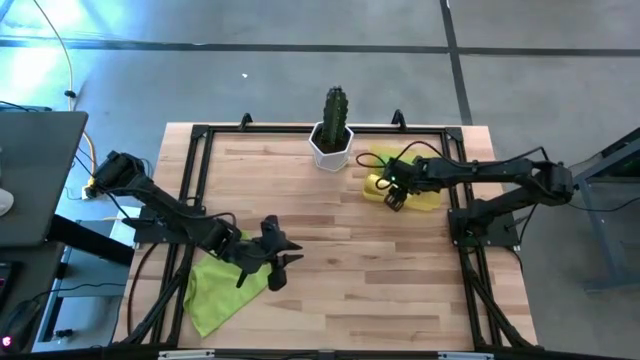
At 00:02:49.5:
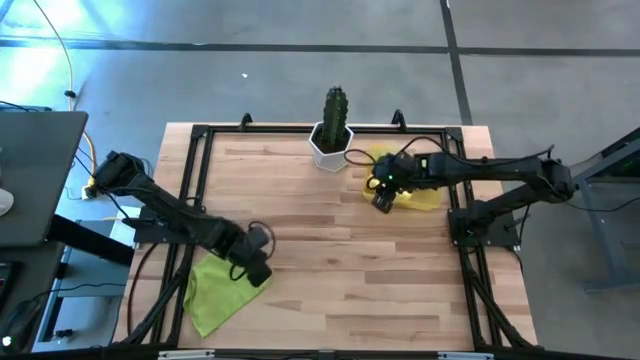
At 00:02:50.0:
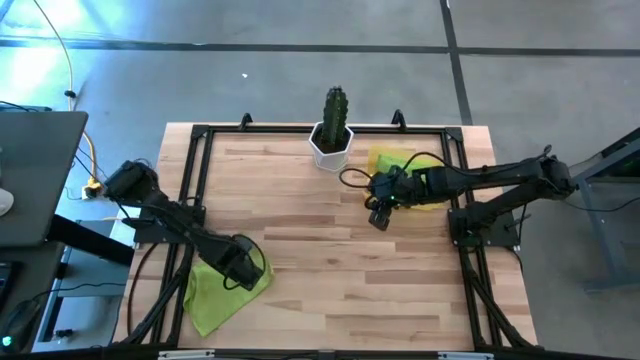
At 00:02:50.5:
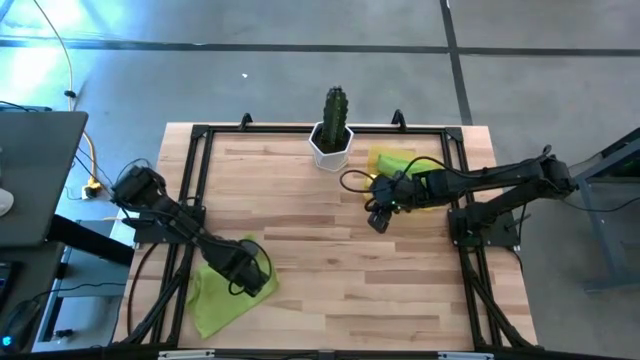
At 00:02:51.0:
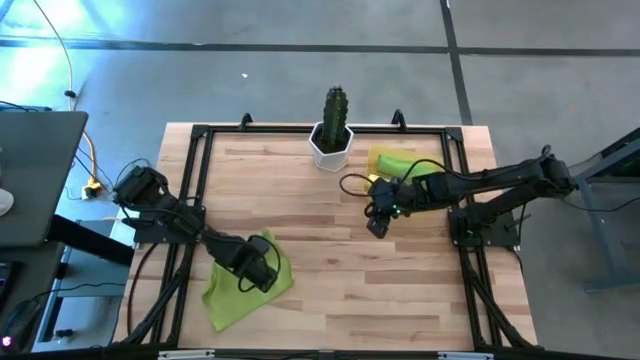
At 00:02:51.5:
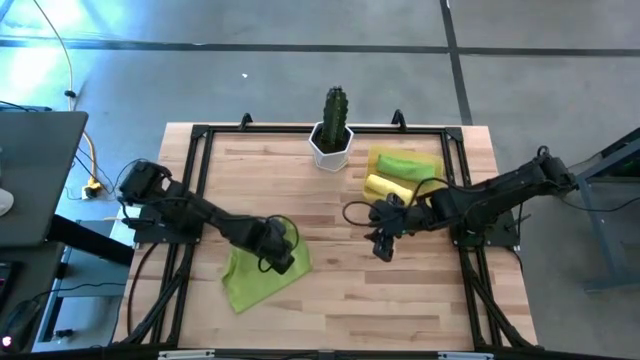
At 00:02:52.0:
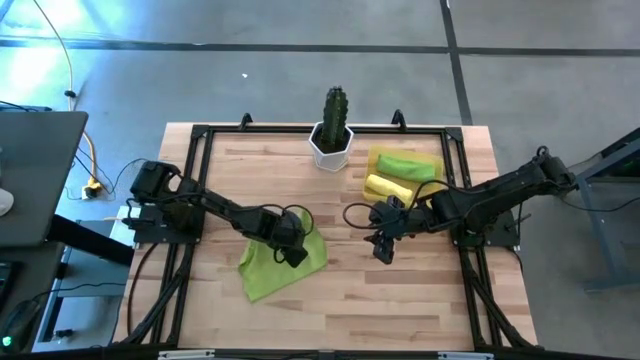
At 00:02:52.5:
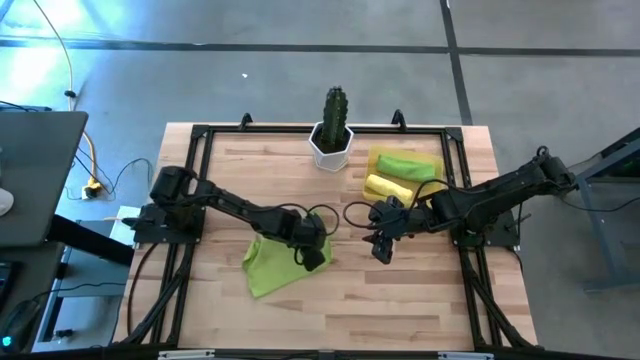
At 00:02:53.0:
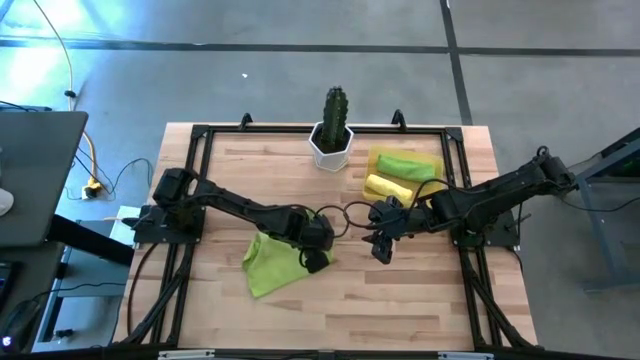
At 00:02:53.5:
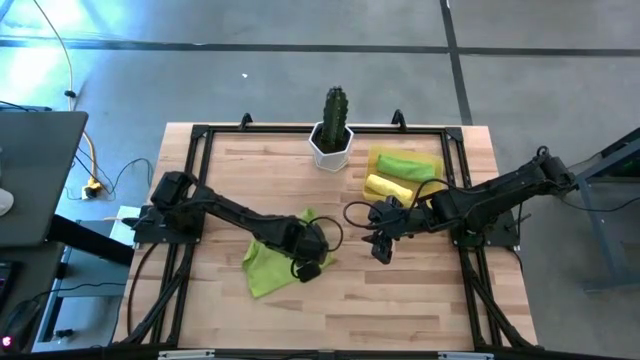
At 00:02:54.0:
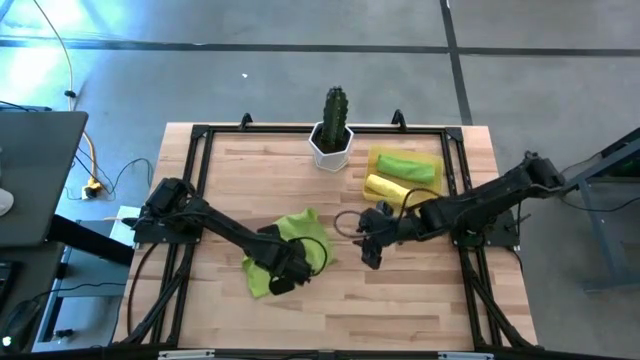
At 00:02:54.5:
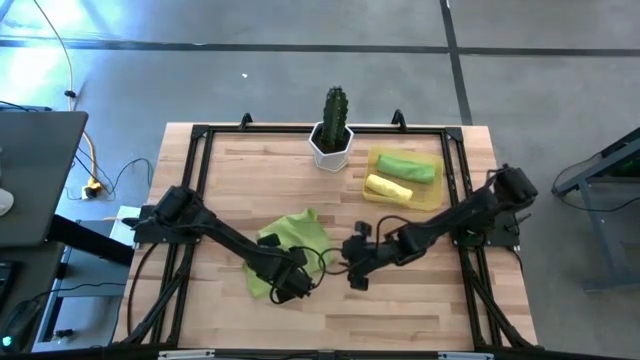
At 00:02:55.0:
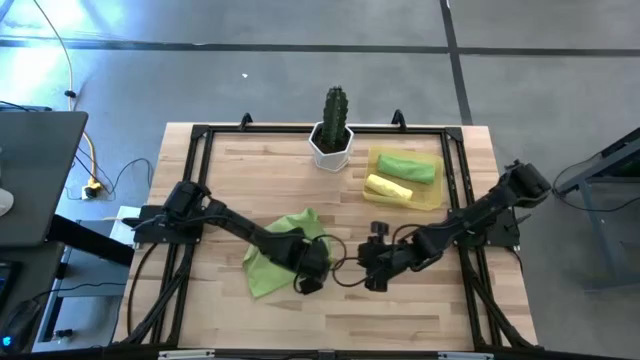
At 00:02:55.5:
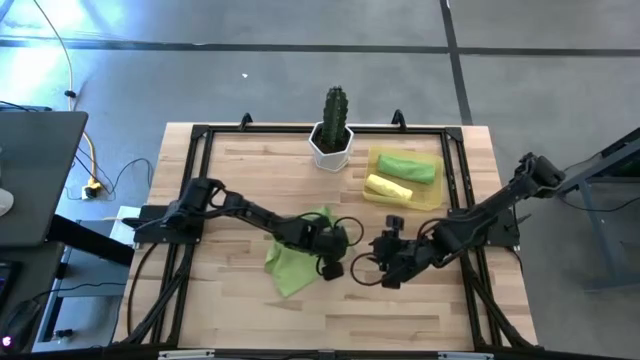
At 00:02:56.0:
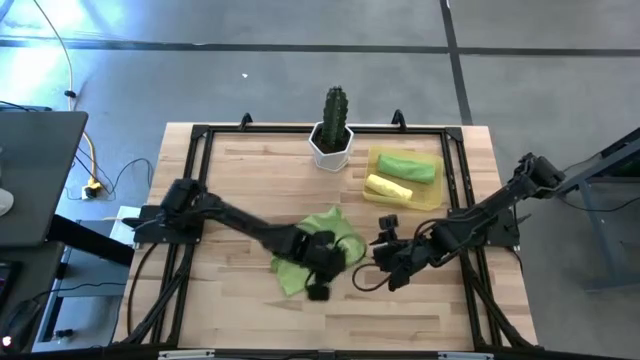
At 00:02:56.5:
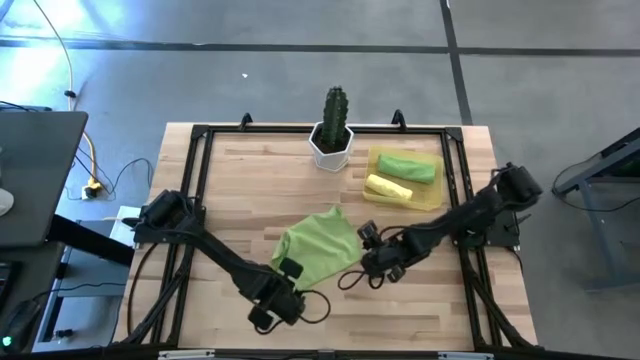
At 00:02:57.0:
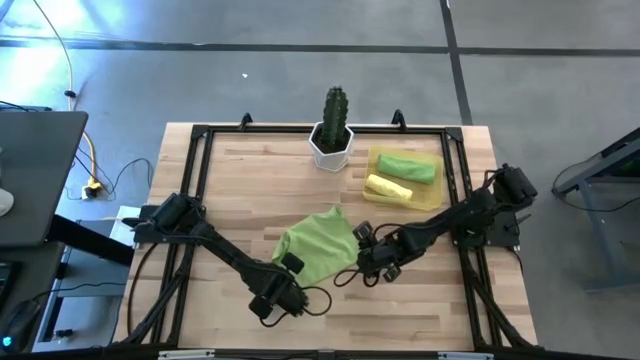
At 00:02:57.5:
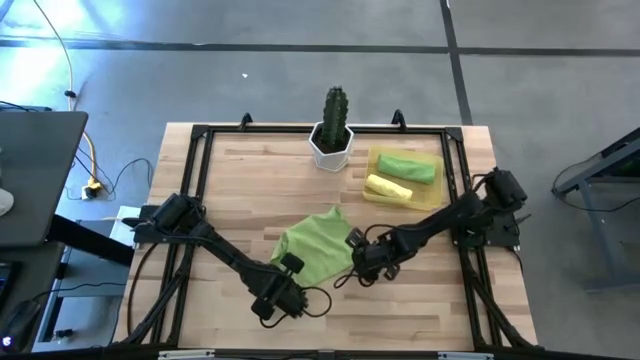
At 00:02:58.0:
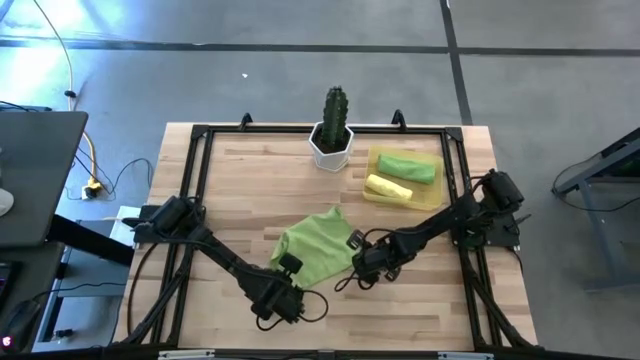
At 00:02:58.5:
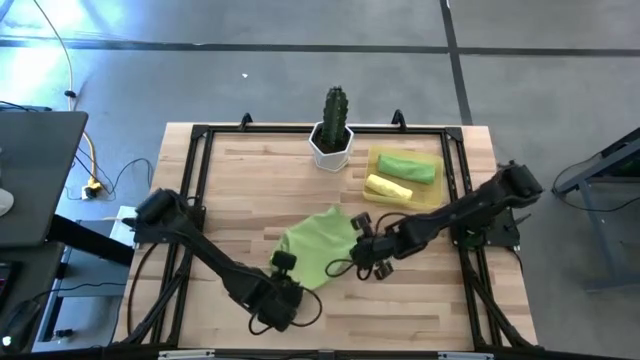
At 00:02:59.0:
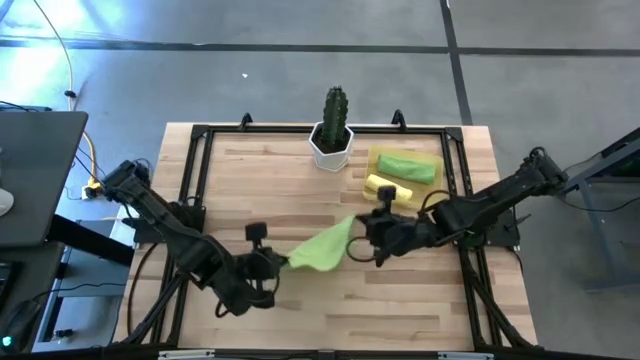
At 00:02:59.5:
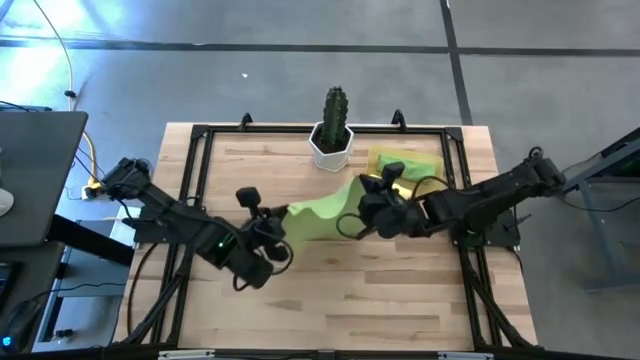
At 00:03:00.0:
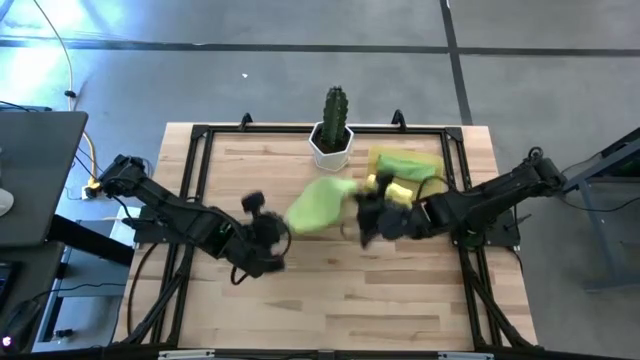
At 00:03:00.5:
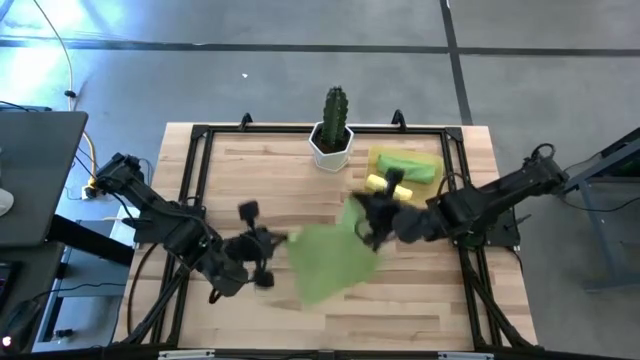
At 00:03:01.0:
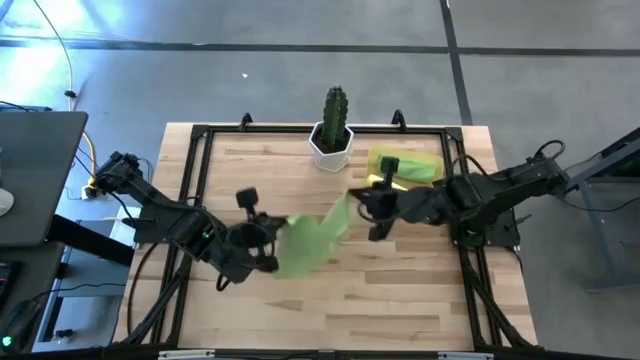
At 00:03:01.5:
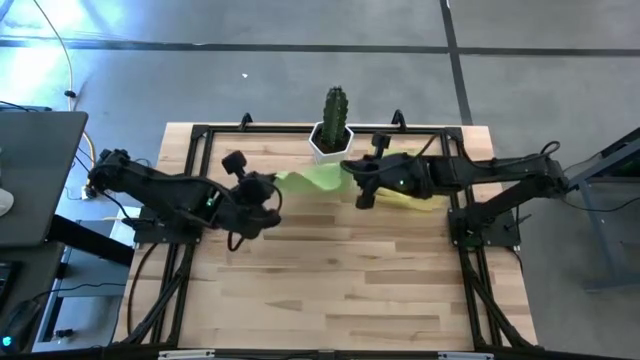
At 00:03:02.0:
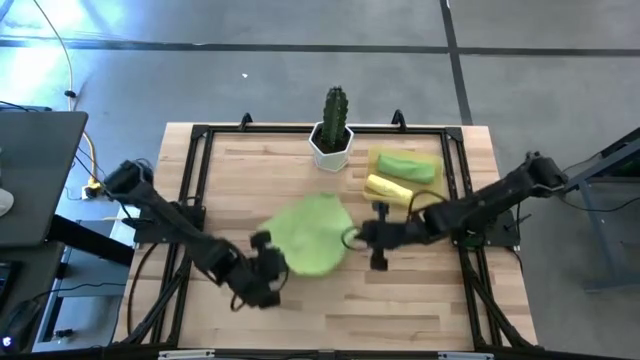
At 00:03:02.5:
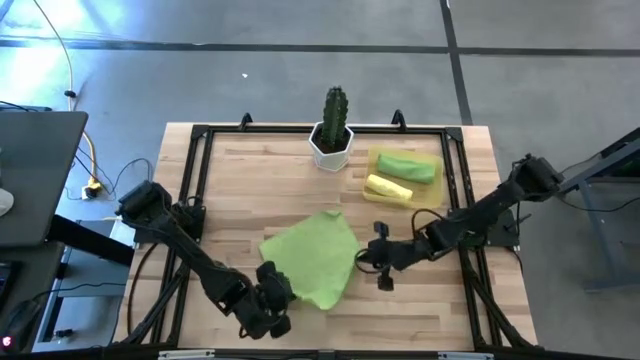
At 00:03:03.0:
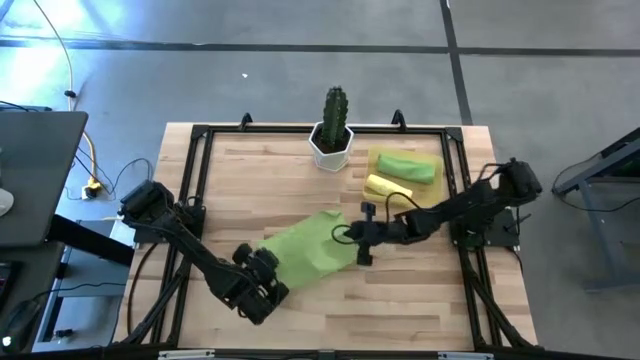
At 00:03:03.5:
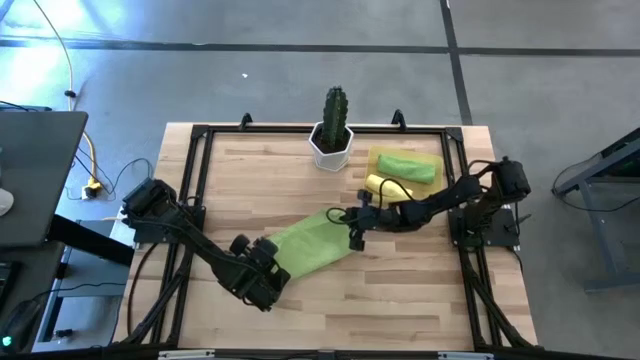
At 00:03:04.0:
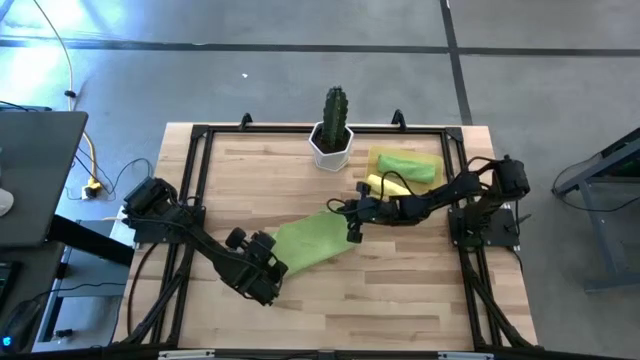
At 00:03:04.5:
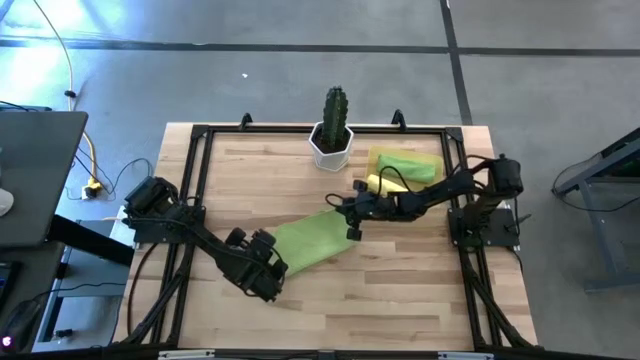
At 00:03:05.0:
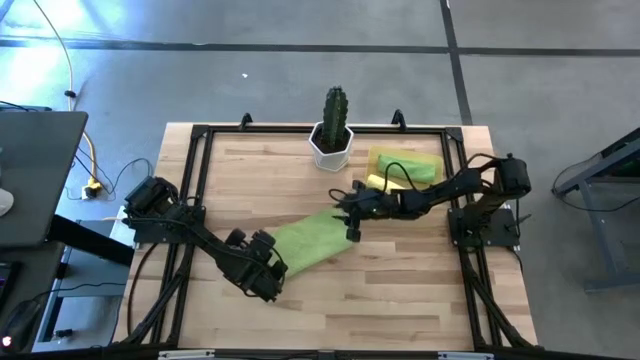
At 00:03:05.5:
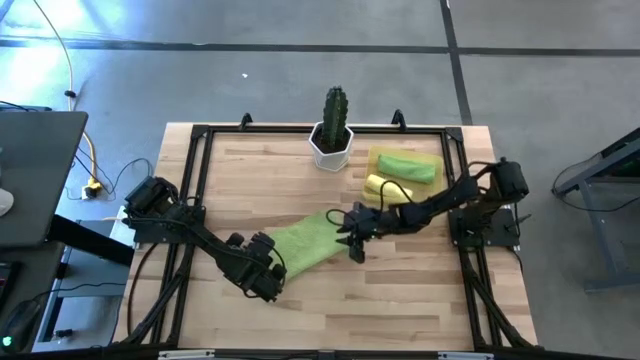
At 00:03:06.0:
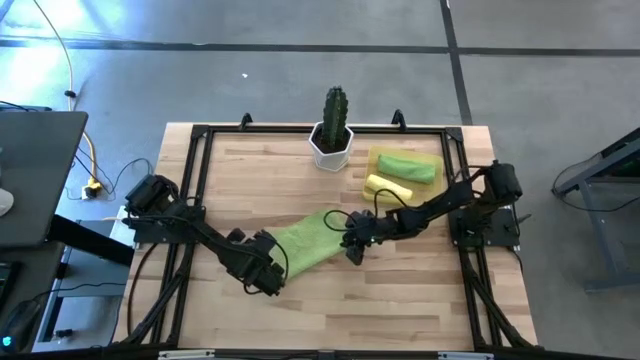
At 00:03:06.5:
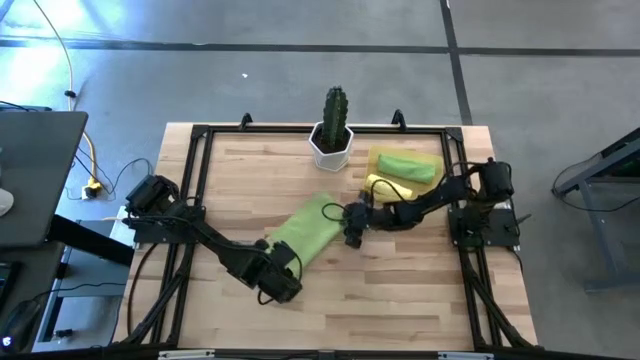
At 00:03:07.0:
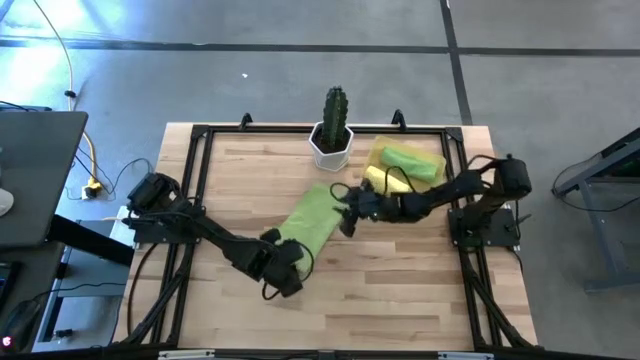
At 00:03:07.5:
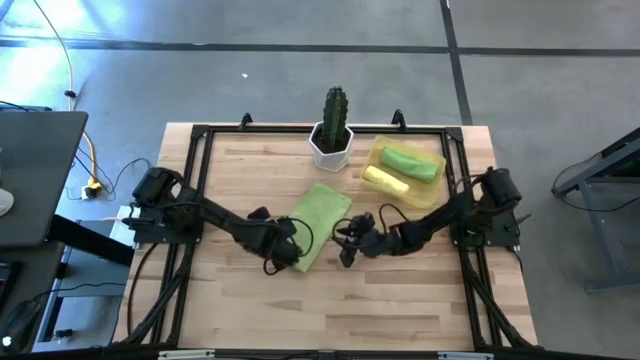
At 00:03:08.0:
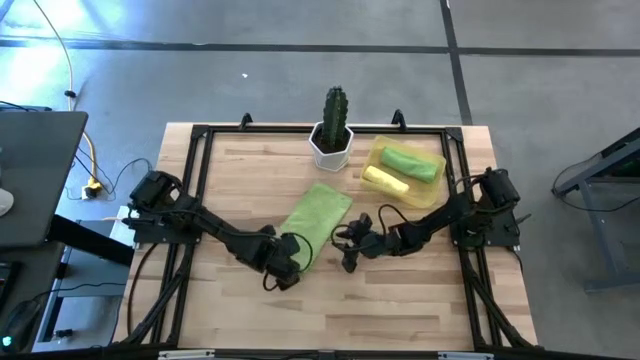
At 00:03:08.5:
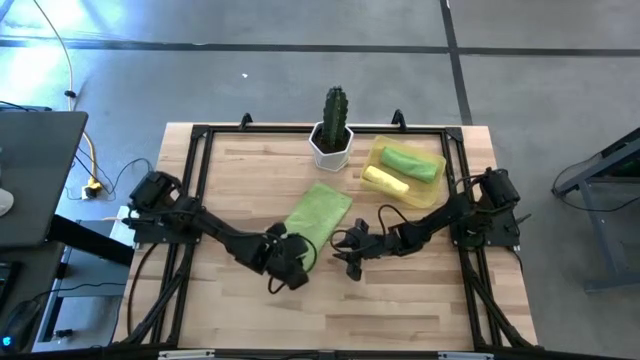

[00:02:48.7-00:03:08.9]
Task: Roll microfiber towels into tight, uniform cylinder then place into a basket
Roll the light green towel

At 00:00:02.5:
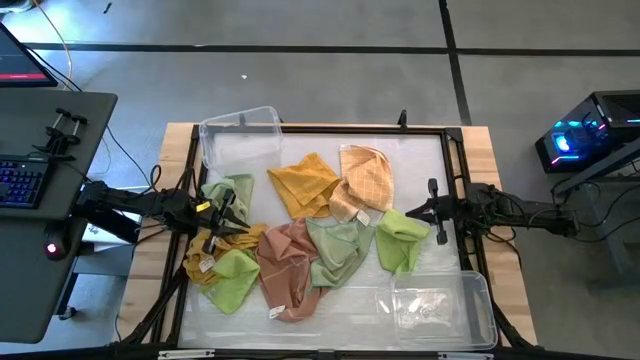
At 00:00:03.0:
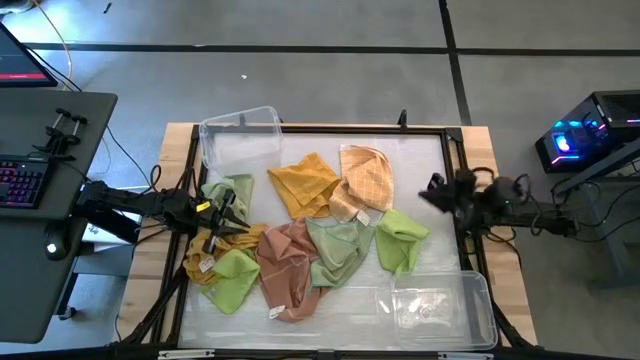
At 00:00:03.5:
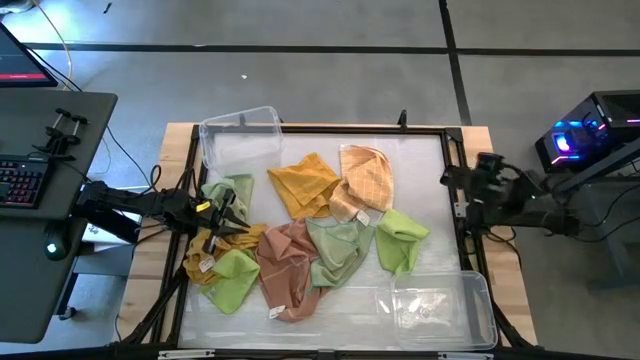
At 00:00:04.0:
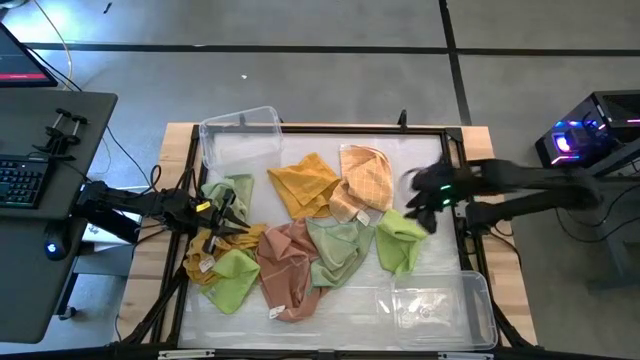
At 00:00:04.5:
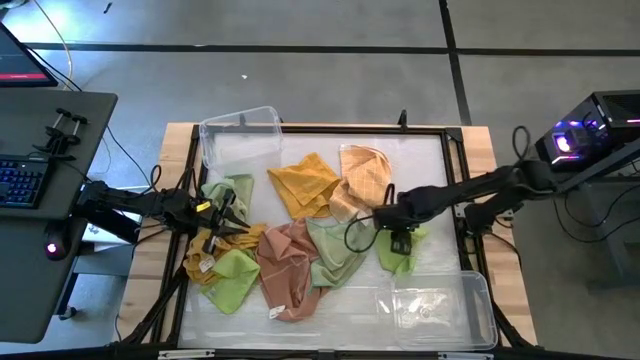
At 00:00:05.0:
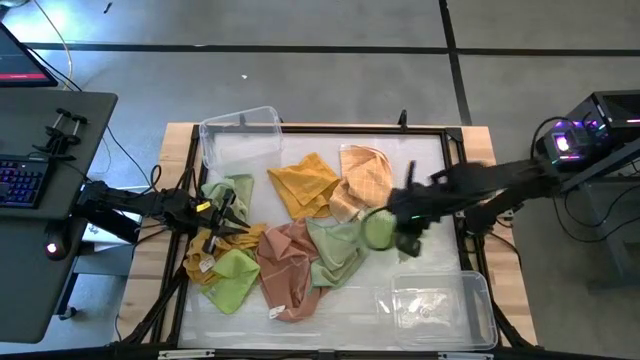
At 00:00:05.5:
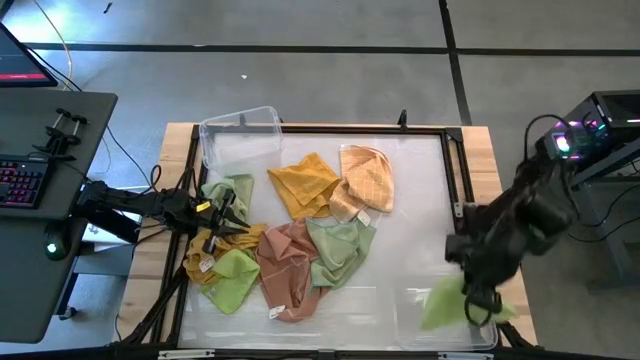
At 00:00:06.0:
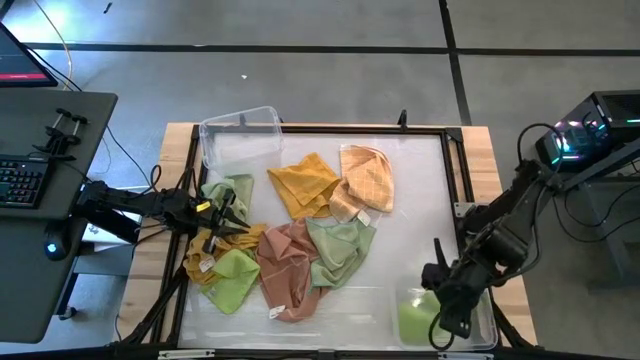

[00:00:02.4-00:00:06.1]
Task: Sort towels by color in basket
Put the right light green microfiber towel into the bottom transparent bin
